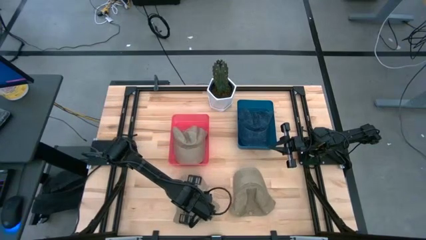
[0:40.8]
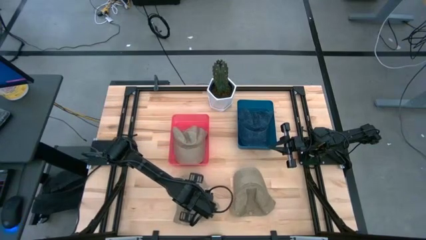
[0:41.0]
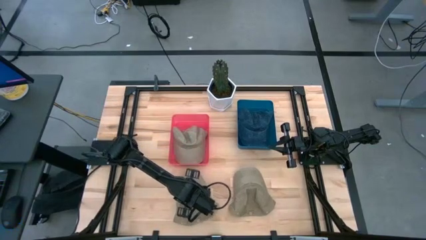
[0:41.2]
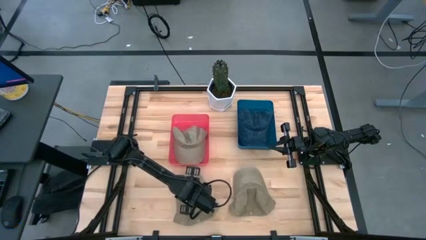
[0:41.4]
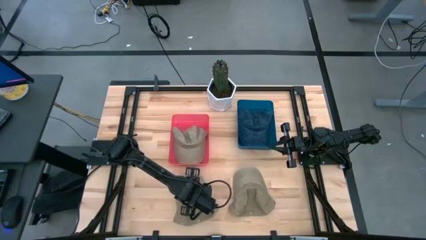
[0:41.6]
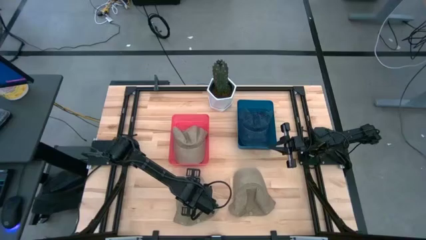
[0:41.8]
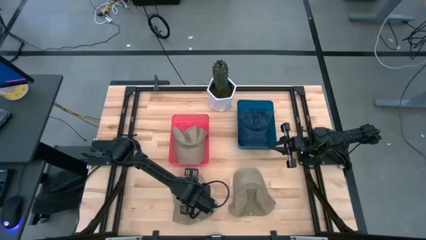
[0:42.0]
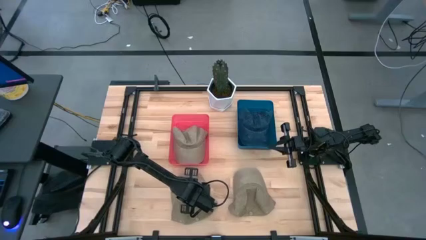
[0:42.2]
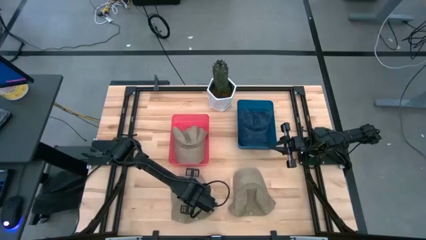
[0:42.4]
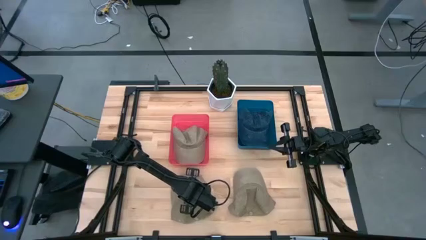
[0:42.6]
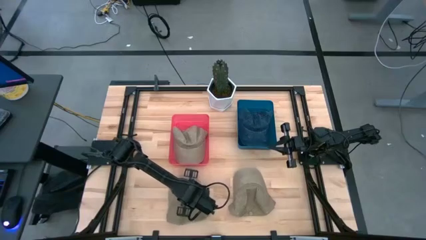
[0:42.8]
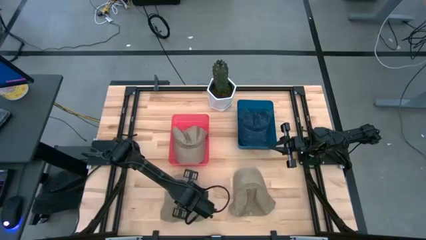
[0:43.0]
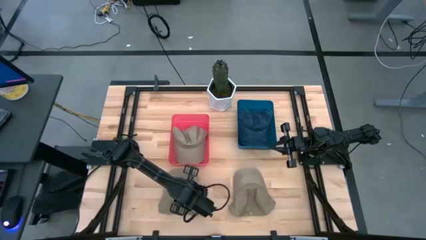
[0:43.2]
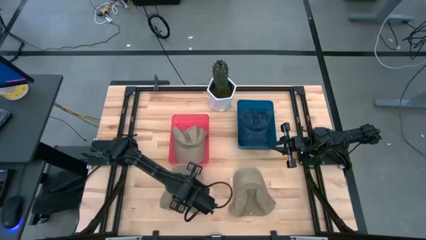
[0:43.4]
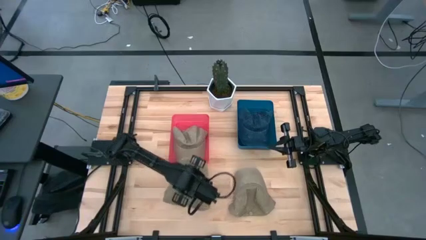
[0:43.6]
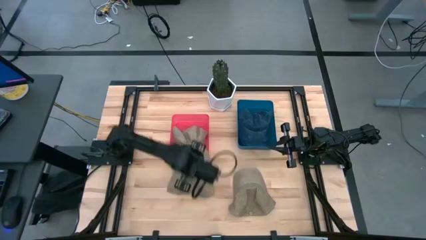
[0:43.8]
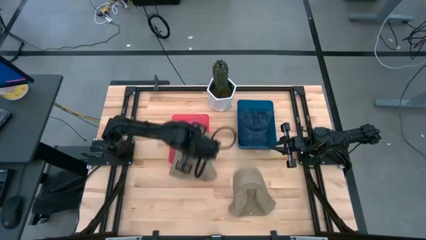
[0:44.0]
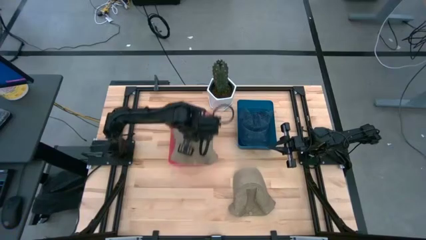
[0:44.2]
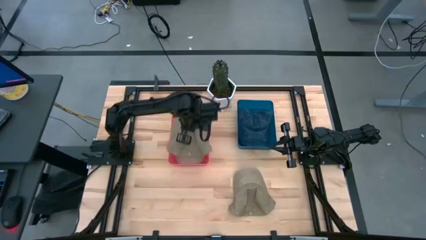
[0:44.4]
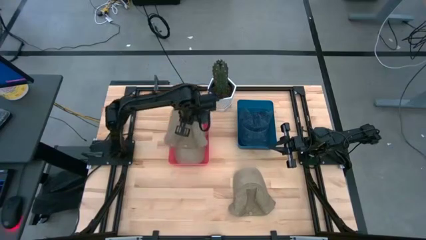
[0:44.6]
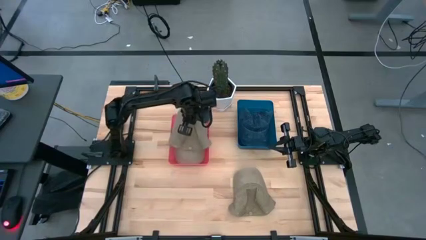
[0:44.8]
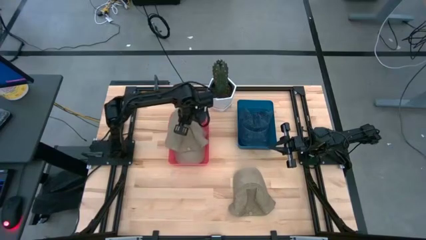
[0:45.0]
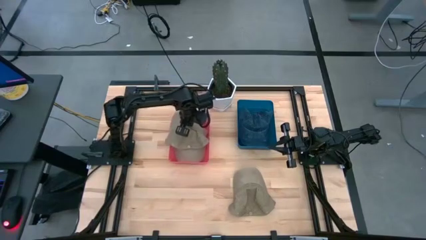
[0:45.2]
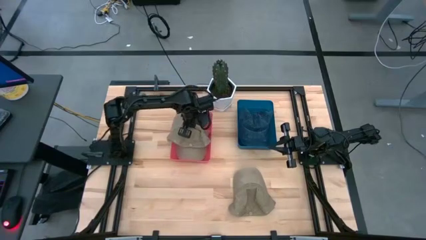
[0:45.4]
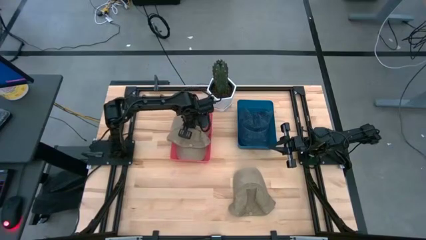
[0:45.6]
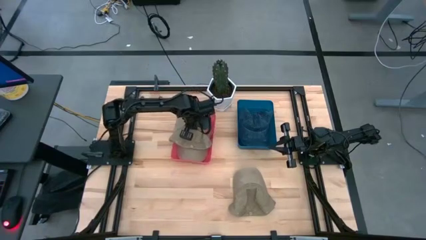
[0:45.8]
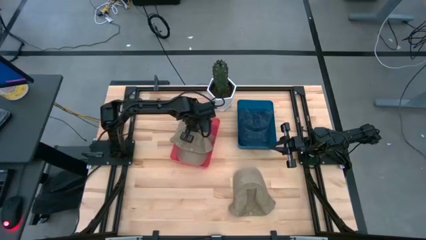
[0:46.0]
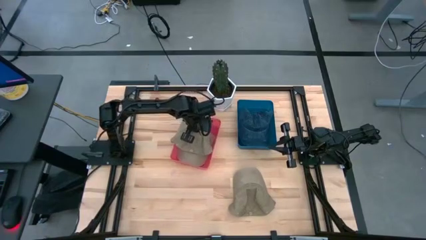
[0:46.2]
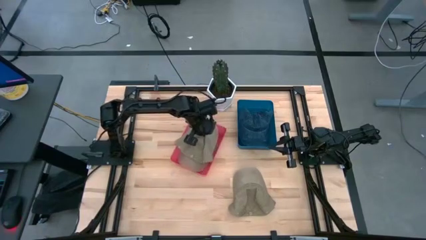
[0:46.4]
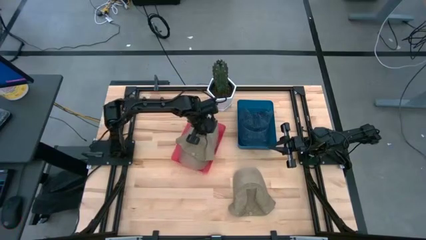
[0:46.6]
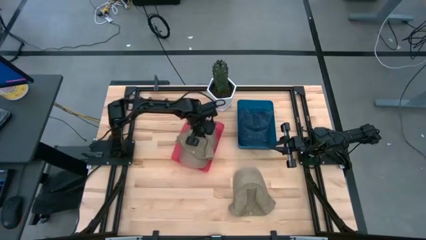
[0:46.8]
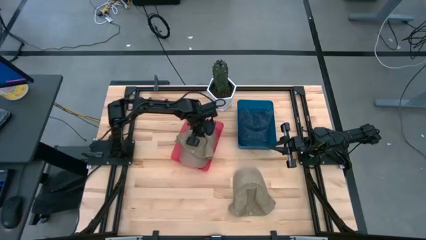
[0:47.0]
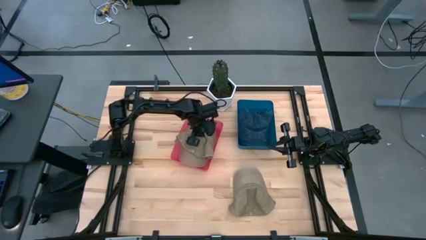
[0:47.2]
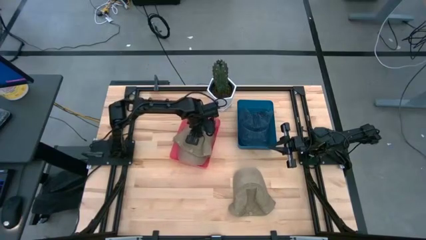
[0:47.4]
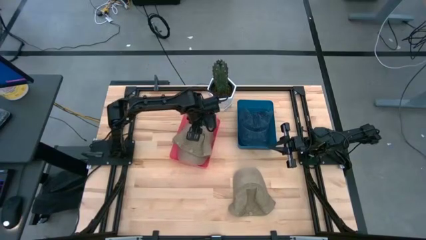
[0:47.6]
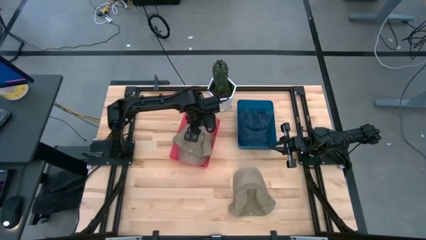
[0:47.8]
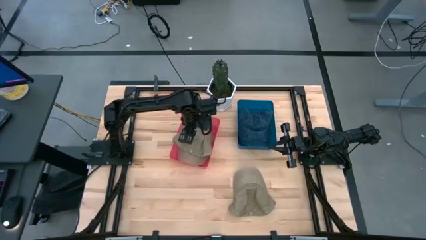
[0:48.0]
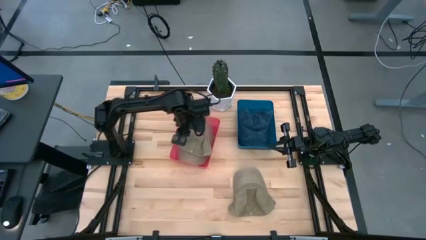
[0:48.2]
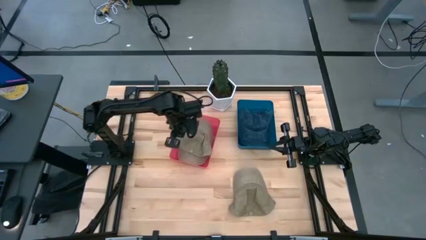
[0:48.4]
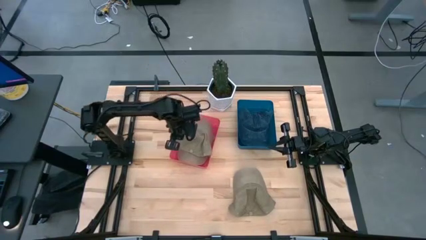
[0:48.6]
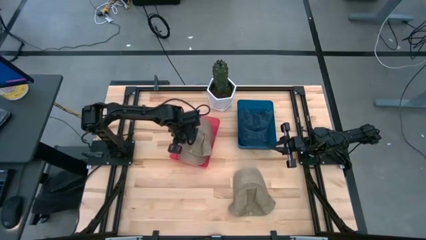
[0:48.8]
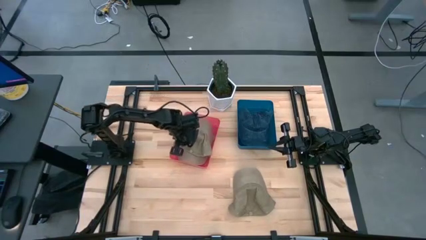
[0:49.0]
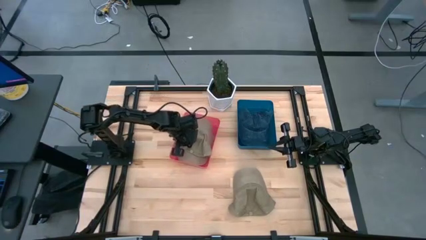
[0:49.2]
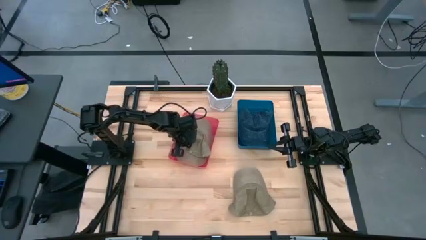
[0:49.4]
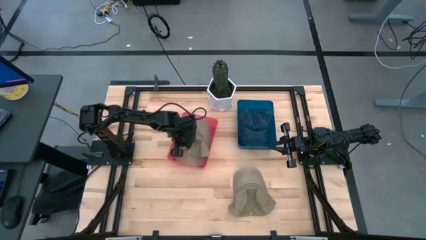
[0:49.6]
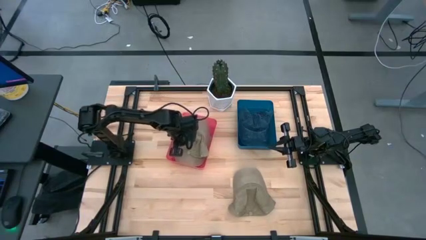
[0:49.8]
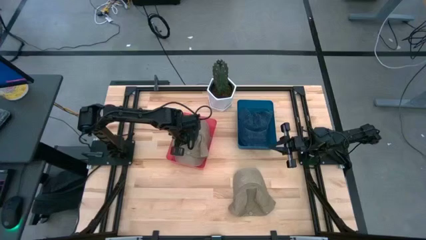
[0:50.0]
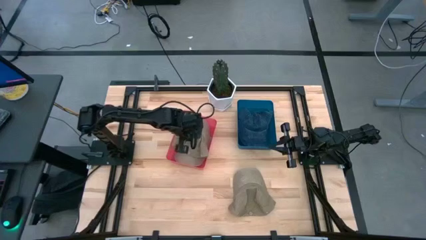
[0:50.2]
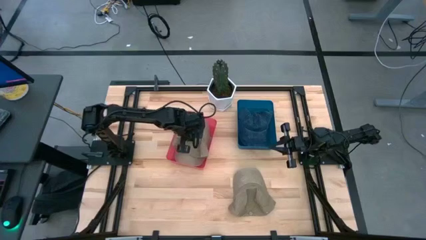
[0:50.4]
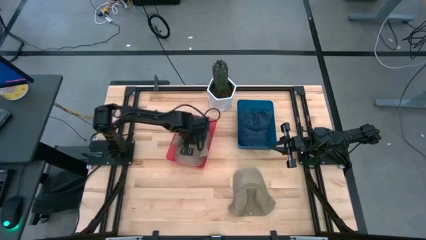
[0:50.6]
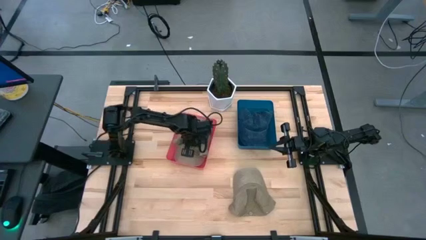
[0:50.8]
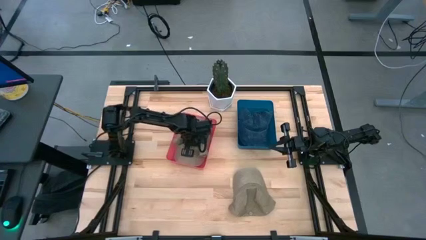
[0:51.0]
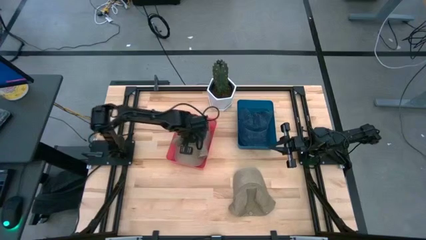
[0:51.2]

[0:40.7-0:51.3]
Task: Pick & Place hat
Put the left brown cap into the red bin
